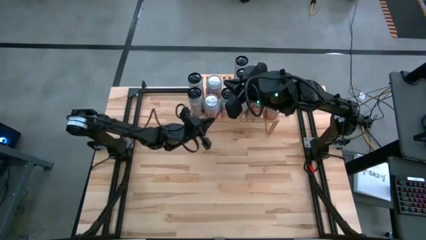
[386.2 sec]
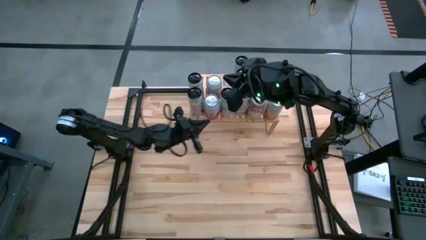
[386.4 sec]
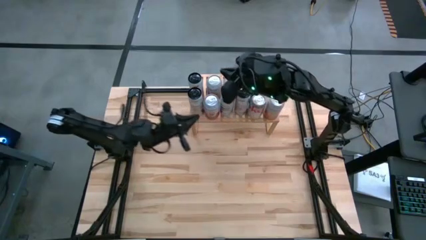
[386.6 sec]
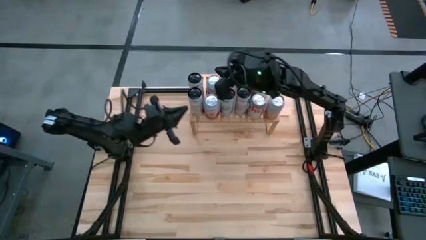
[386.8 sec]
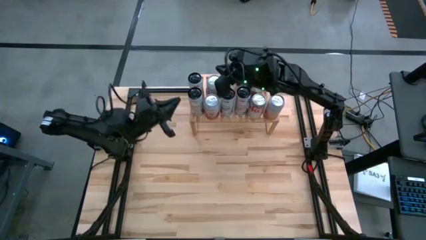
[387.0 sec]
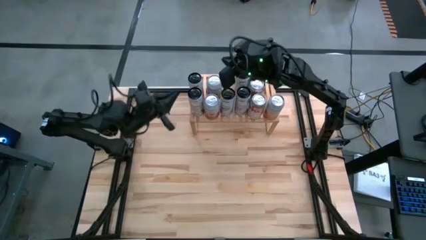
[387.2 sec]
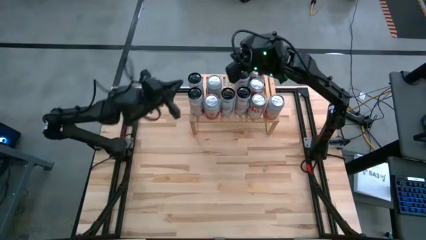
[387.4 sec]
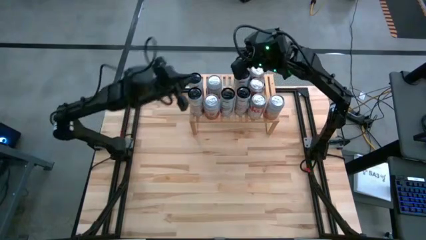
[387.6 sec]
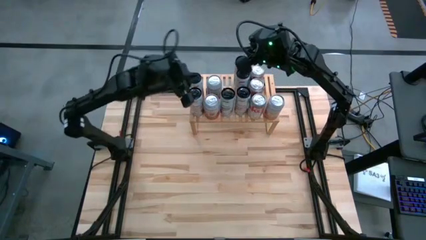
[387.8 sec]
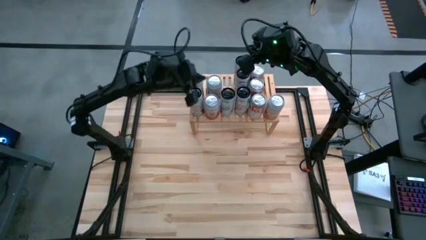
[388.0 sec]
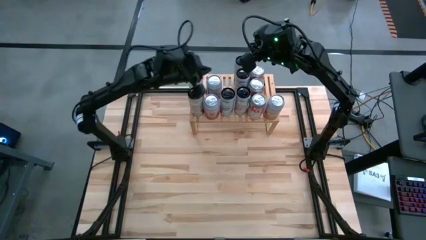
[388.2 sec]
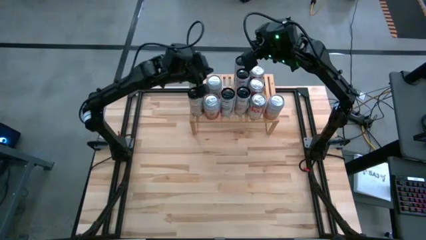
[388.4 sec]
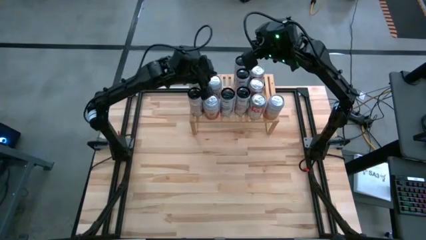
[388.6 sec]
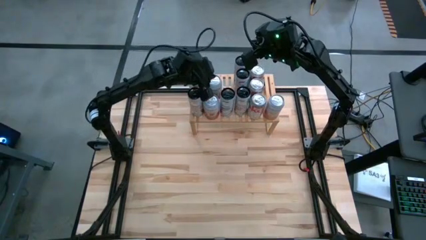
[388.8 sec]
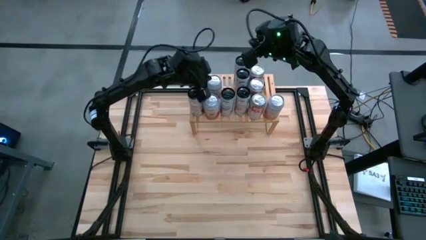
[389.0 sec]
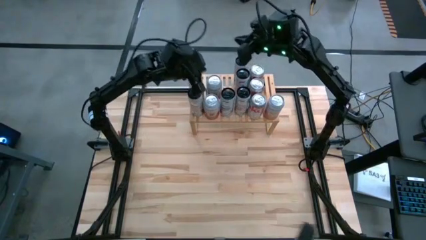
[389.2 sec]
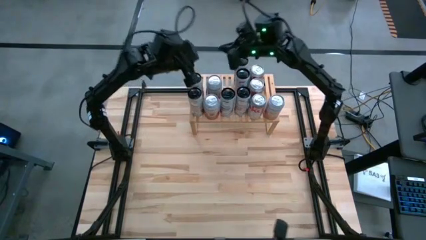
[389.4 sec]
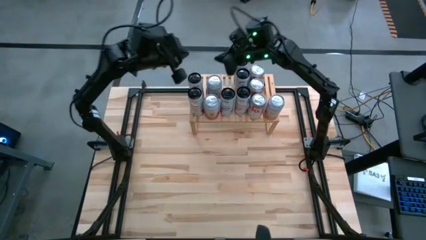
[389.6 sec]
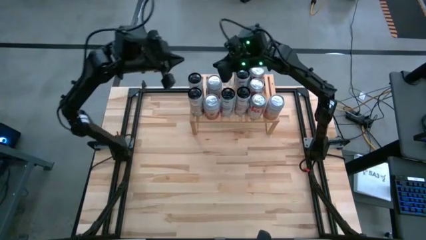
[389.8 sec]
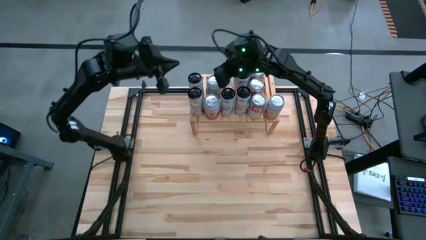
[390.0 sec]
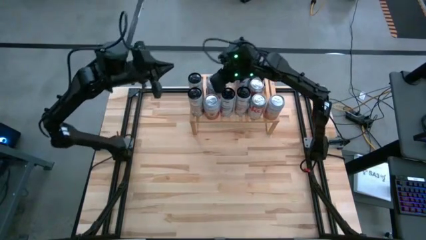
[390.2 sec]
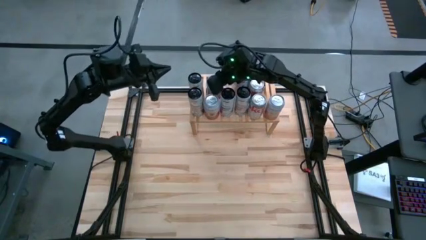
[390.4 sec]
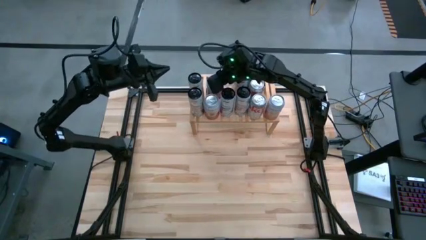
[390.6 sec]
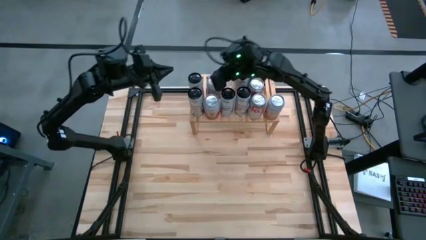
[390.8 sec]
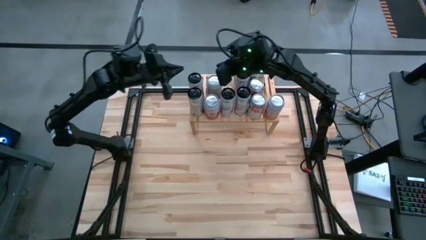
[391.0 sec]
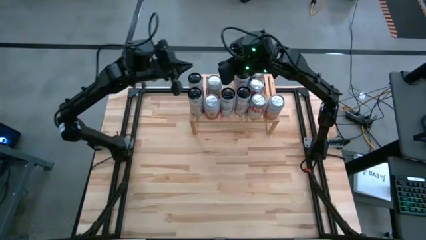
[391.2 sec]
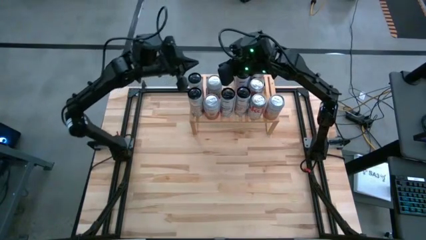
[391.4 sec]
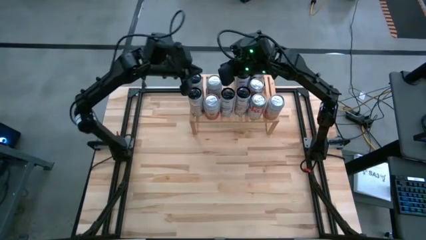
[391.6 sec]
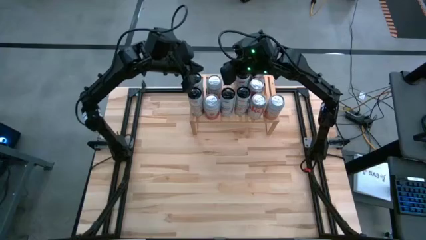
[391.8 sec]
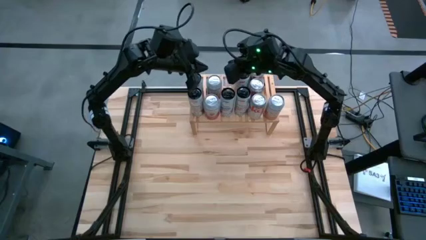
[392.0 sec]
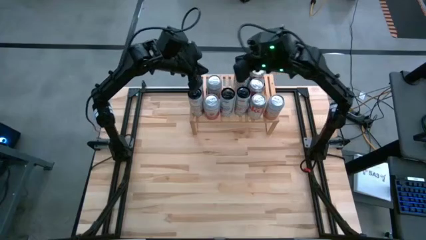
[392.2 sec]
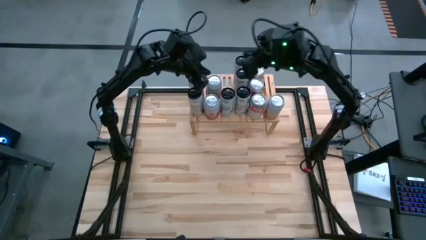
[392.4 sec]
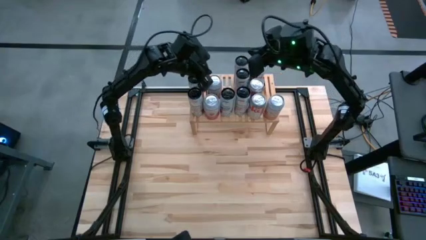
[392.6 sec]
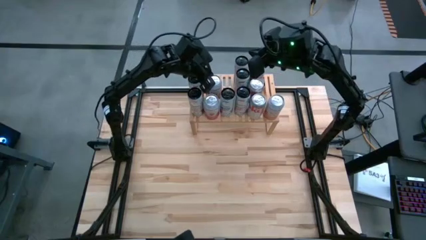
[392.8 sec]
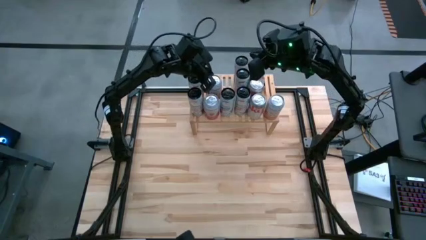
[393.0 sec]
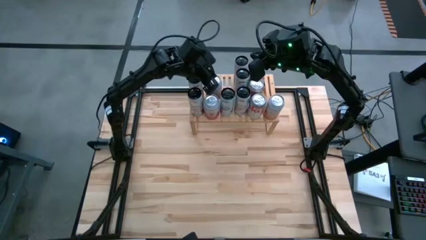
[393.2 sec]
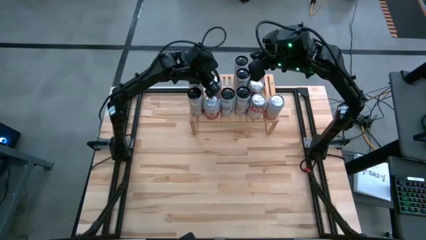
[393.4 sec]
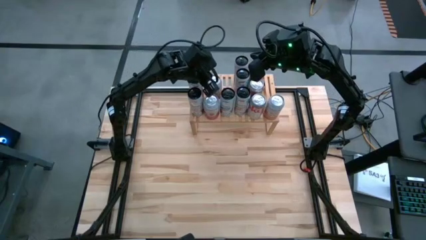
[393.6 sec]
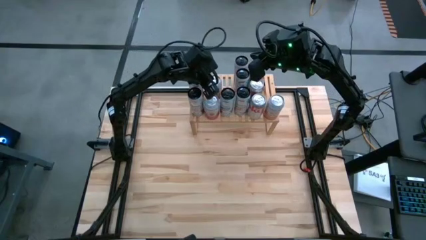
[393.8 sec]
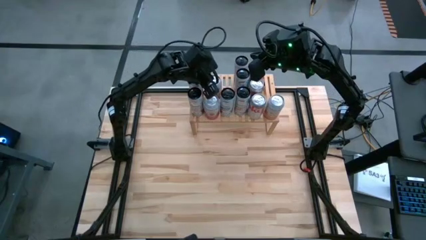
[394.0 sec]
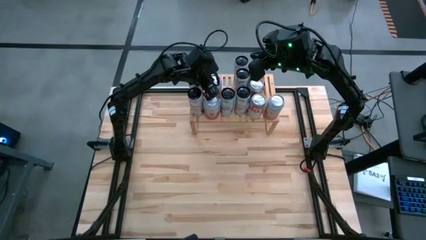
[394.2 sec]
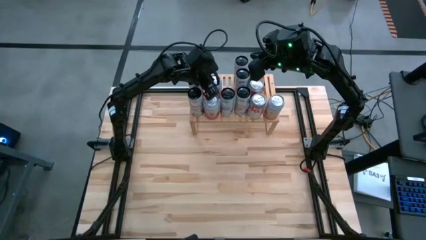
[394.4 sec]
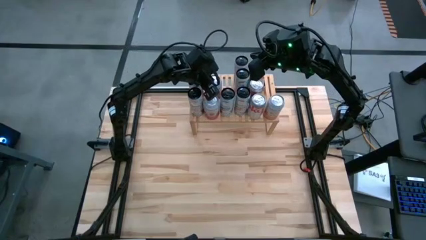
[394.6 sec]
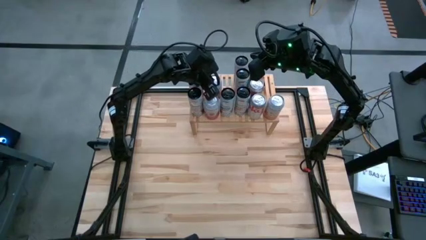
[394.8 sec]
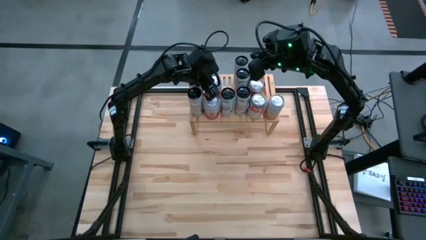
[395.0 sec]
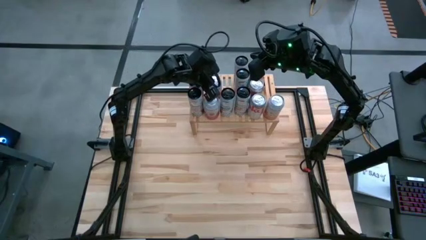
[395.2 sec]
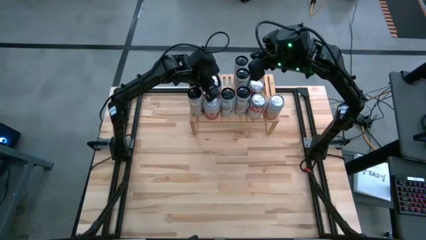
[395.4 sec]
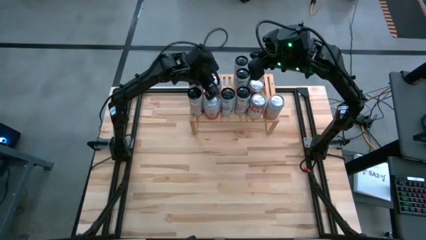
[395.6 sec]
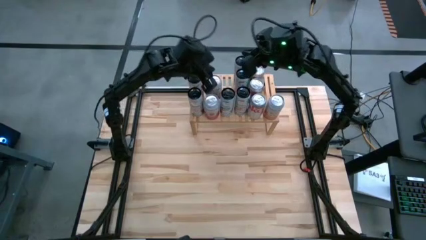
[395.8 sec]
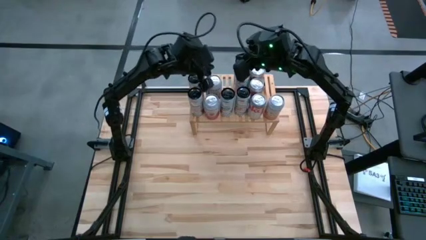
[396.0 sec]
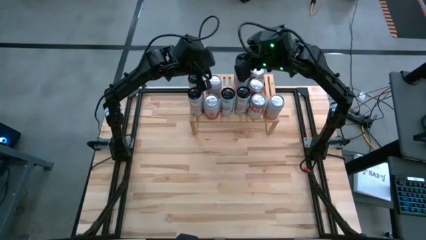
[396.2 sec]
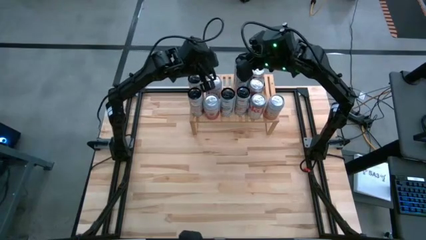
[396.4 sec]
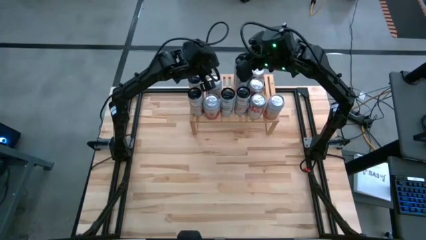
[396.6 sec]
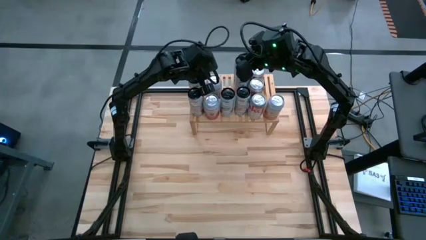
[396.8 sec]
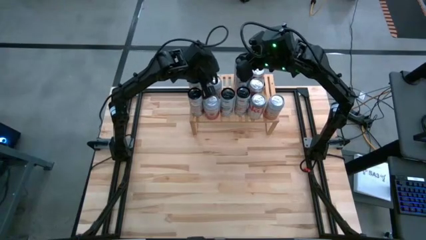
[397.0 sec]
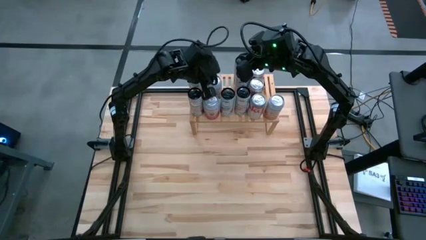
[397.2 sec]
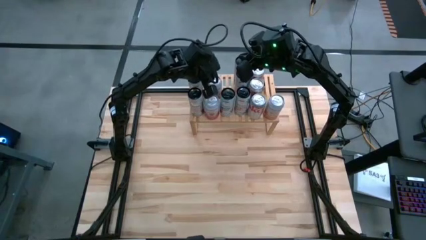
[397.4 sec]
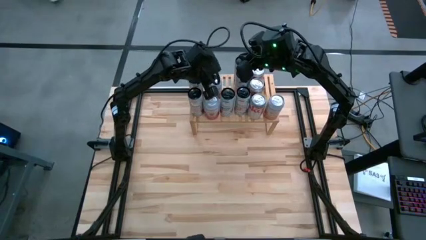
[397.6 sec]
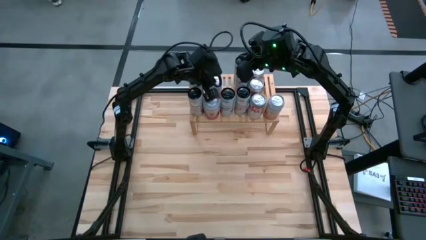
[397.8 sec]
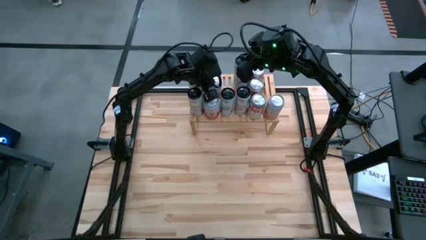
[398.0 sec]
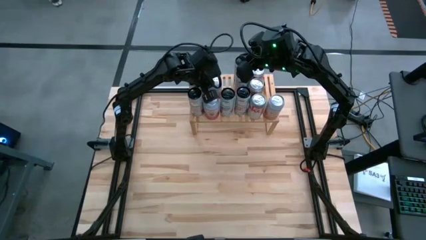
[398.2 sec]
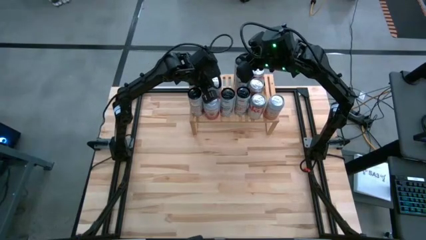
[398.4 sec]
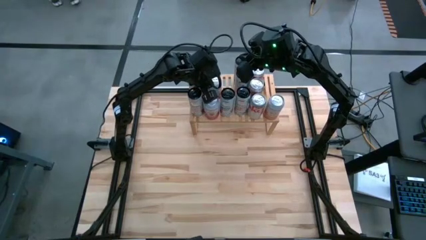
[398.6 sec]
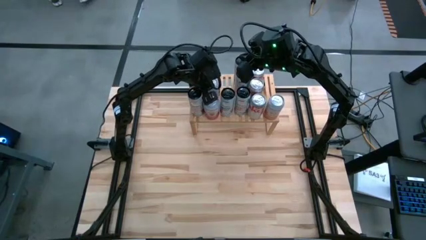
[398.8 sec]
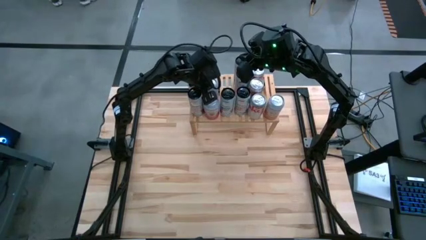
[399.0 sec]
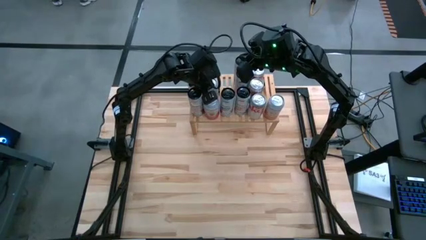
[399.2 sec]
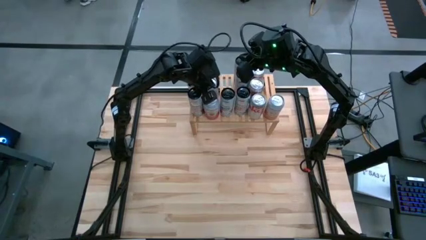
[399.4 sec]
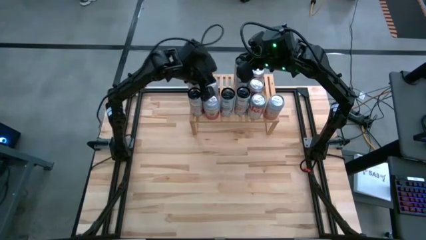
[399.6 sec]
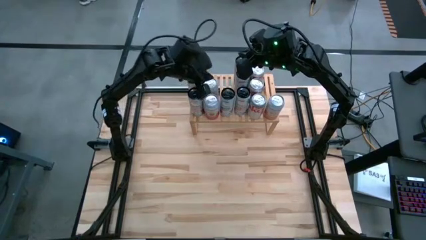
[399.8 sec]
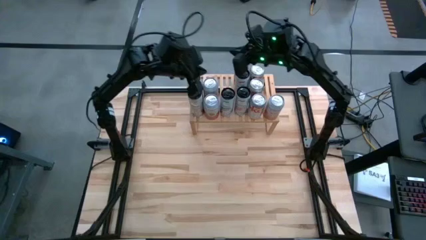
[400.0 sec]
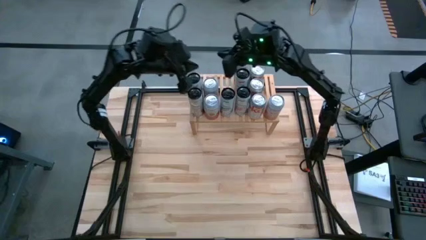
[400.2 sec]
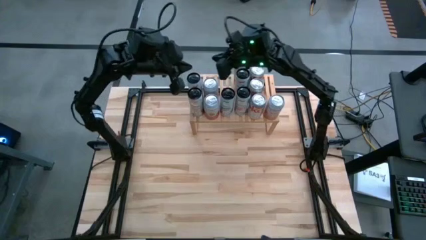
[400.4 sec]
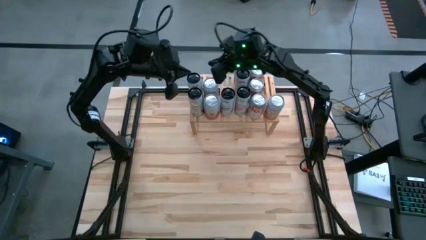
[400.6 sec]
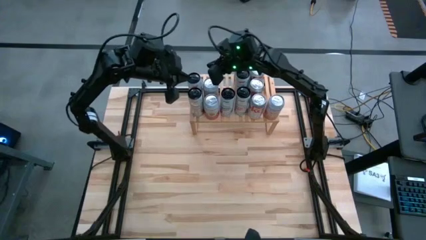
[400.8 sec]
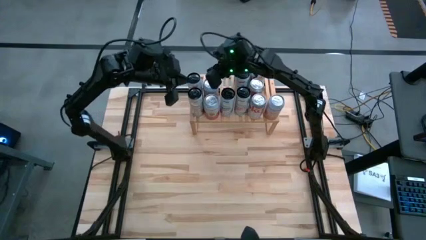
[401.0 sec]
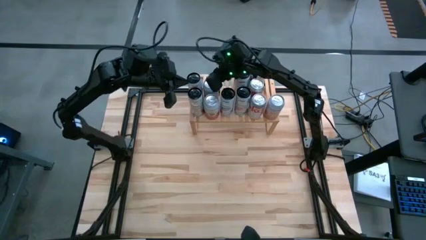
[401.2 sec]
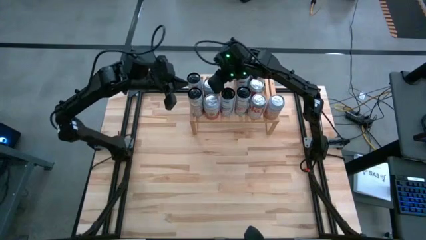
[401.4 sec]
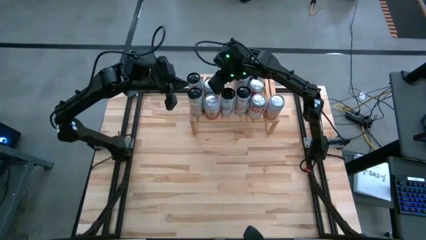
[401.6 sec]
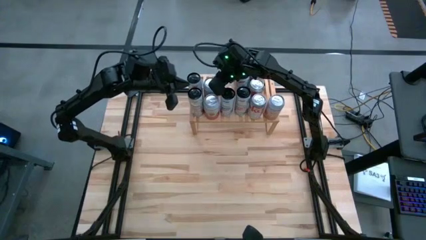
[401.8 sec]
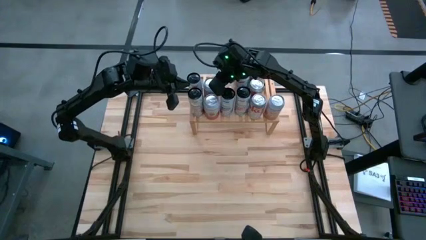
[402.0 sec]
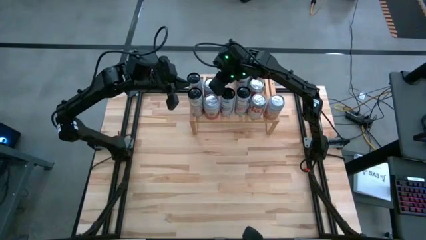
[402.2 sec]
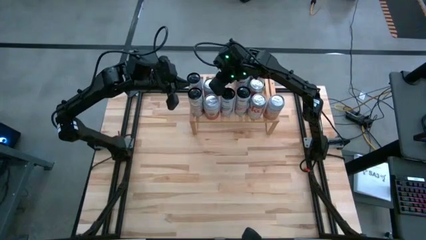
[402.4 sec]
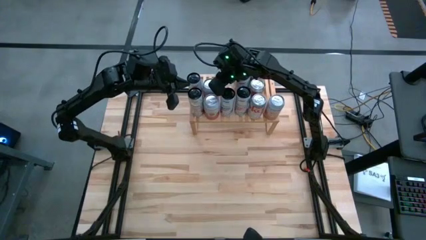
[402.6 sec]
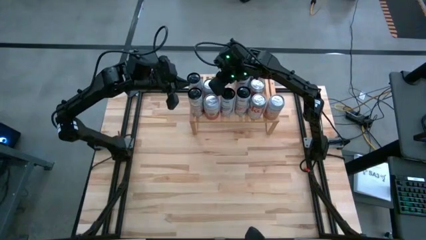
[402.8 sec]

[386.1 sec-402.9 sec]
Task: Place canned beverage on shelf
Adjust the pink and white soda can on the back of the shelf

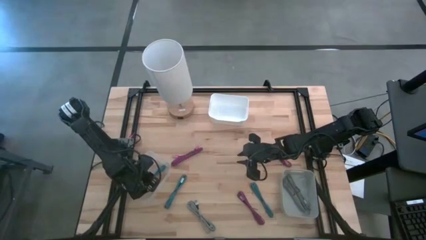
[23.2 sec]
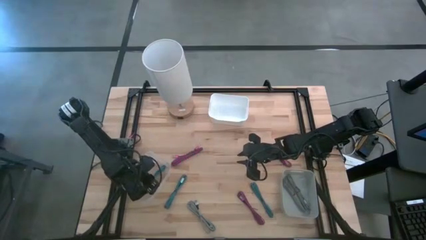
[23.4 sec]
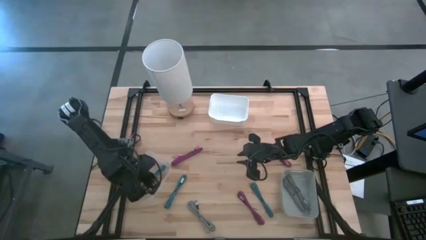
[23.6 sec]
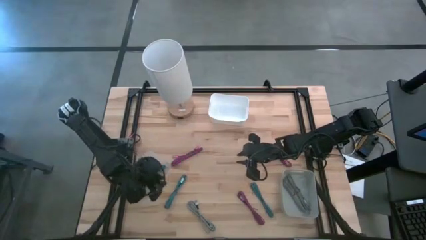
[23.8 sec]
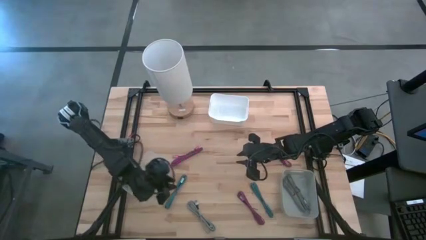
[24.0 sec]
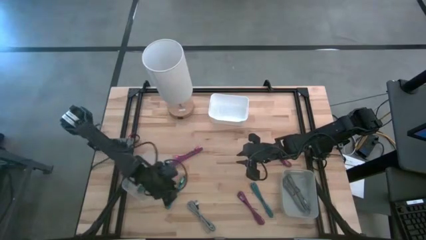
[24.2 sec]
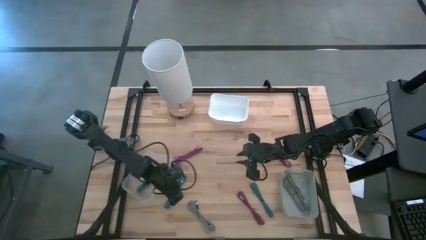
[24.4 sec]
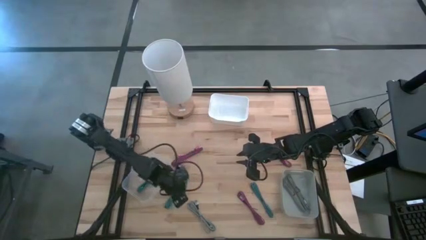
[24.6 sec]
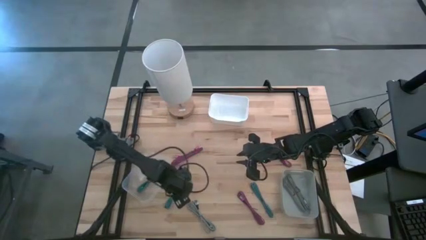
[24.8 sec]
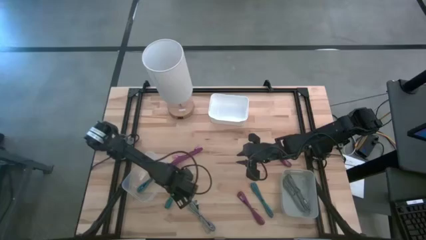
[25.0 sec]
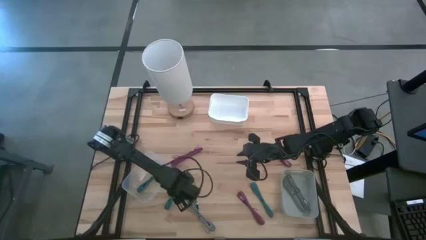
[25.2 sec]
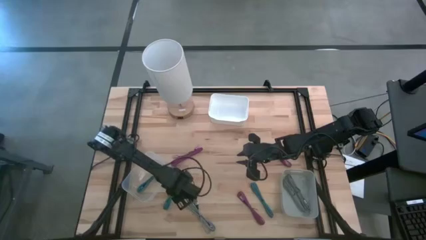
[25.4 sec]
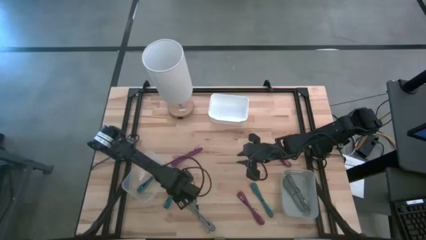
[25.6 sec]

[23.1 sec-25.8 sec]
Task: Pick & Place USB Port
Put the left blue charger cable into the transparent bin
